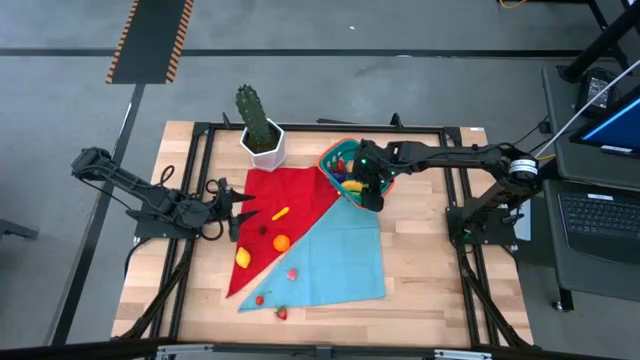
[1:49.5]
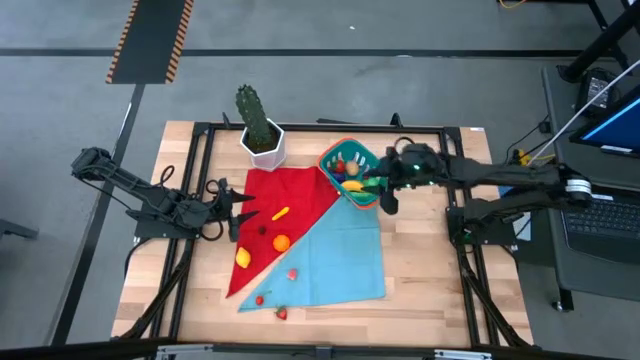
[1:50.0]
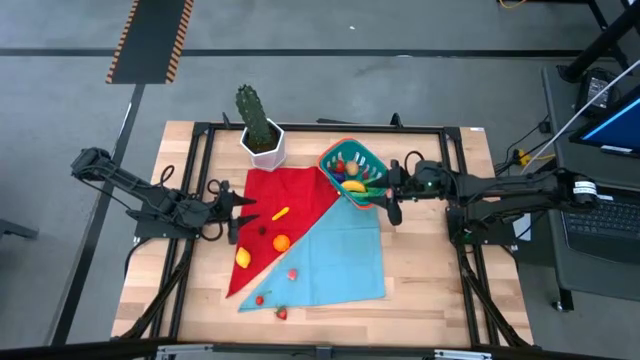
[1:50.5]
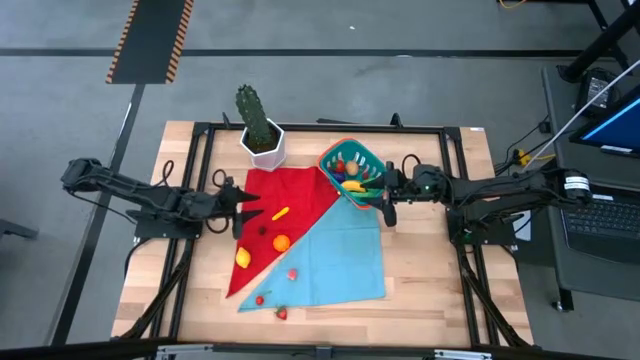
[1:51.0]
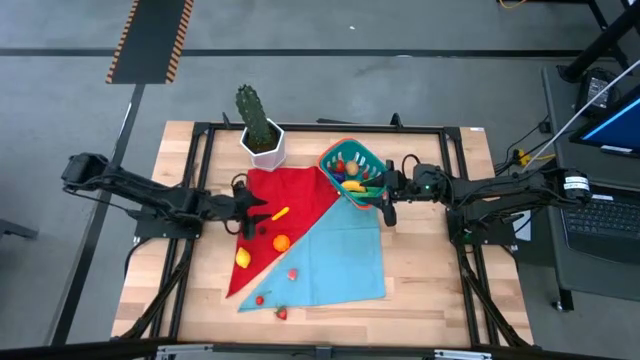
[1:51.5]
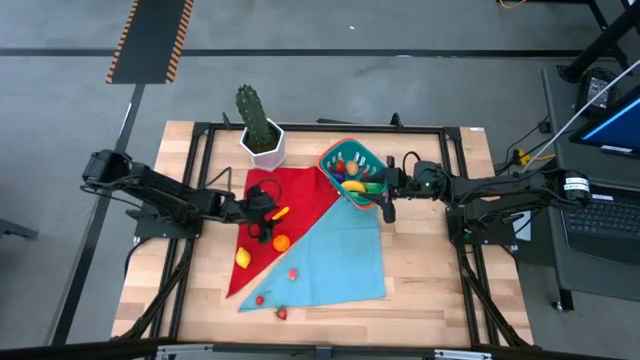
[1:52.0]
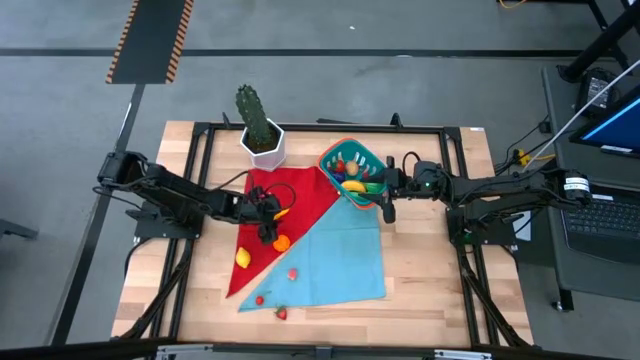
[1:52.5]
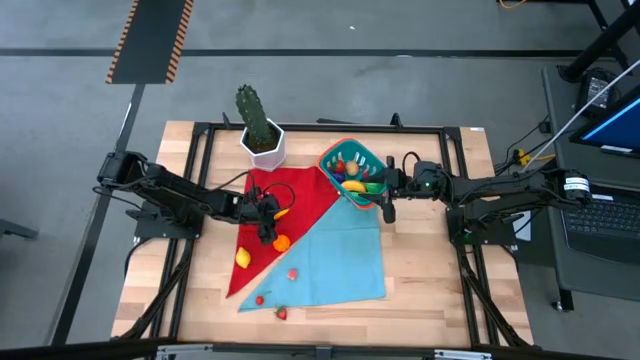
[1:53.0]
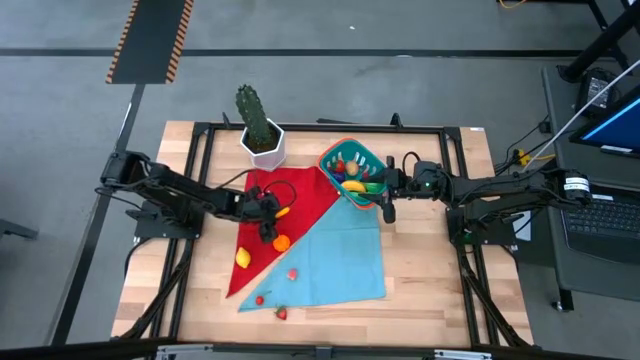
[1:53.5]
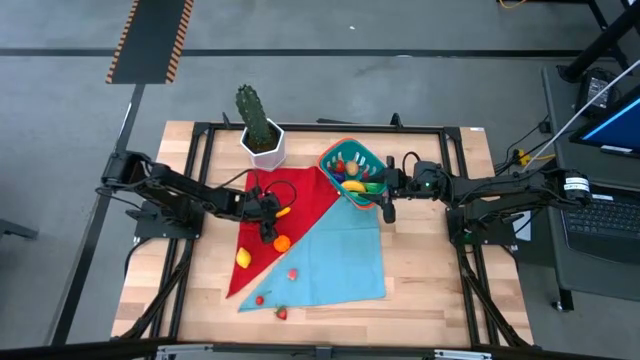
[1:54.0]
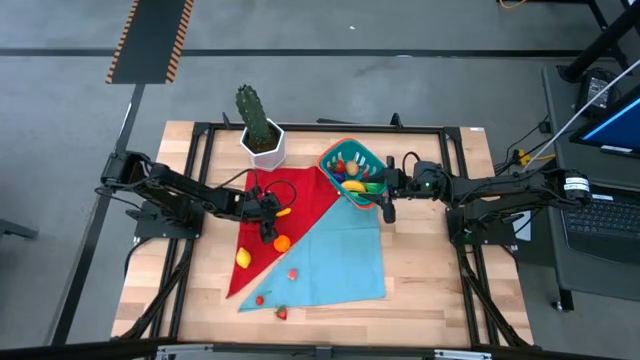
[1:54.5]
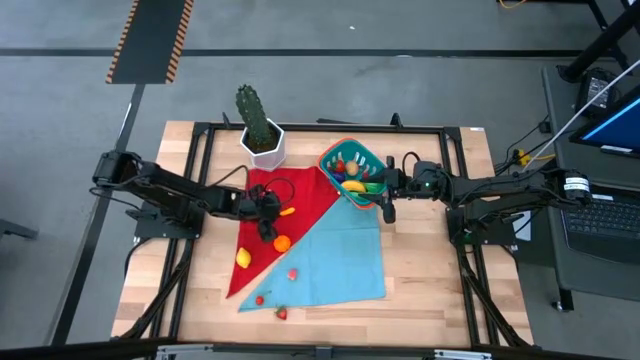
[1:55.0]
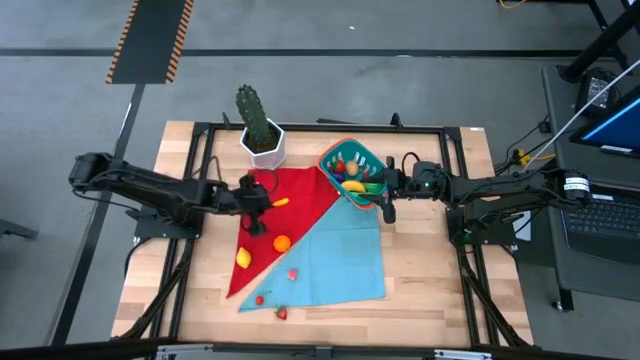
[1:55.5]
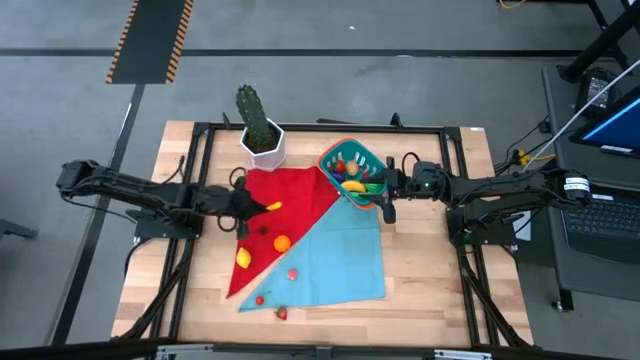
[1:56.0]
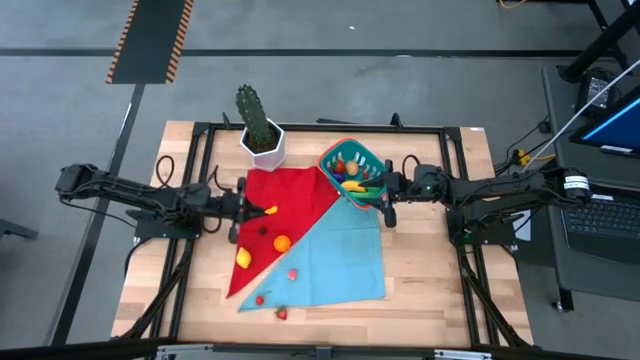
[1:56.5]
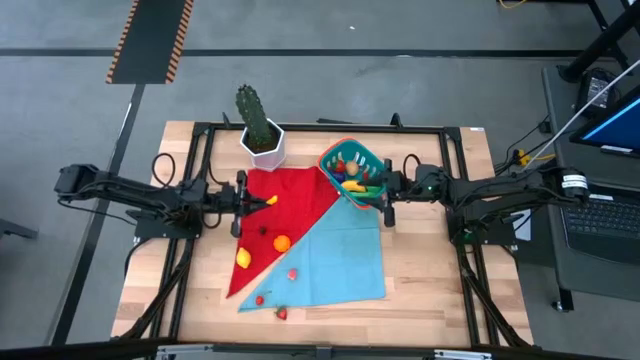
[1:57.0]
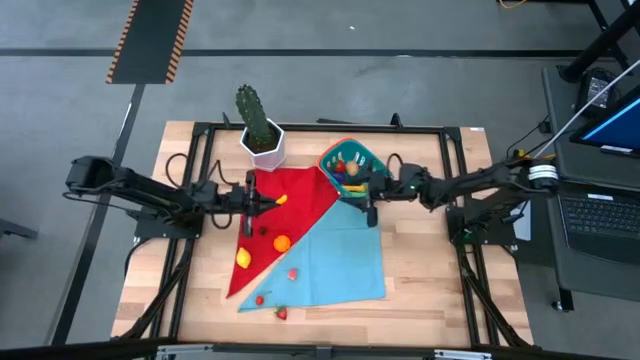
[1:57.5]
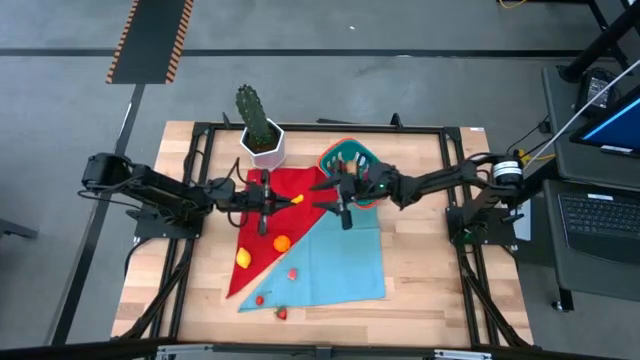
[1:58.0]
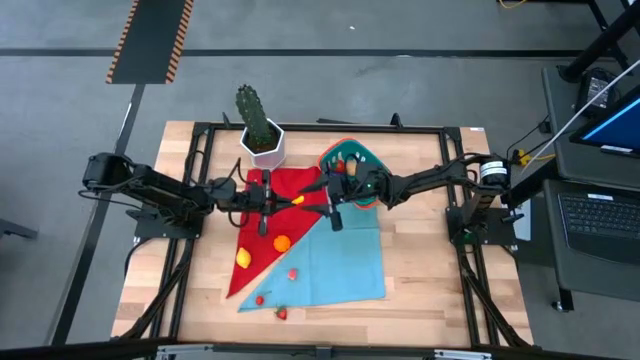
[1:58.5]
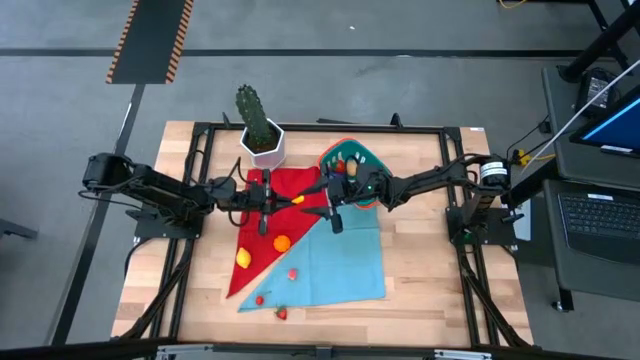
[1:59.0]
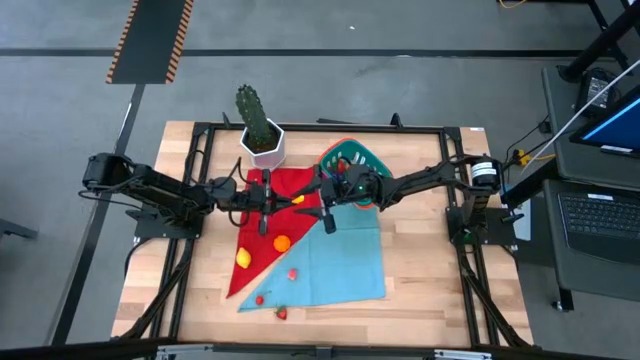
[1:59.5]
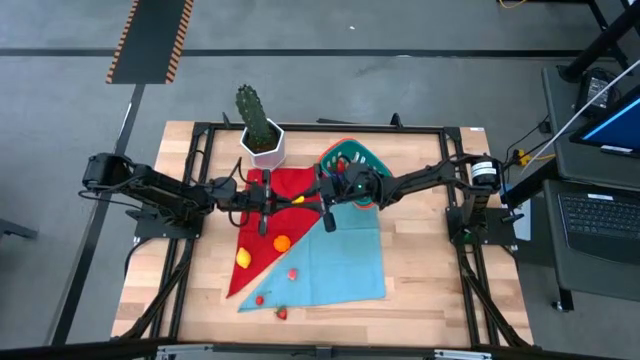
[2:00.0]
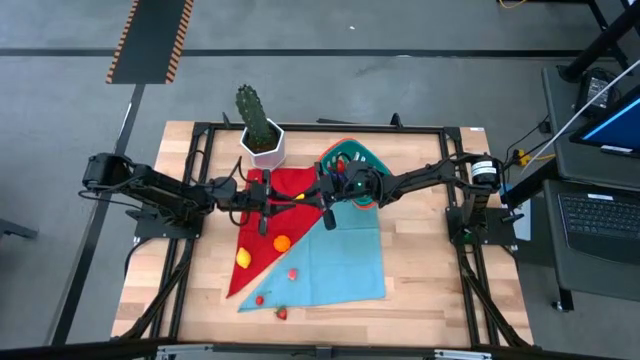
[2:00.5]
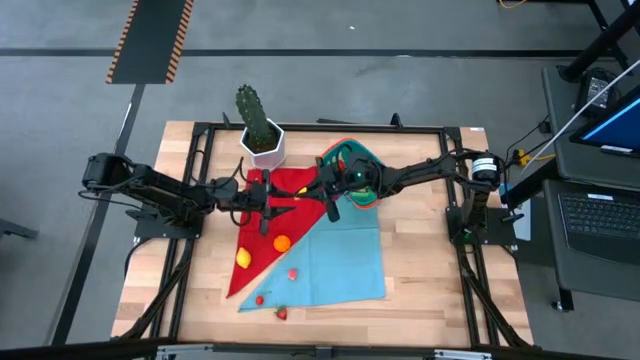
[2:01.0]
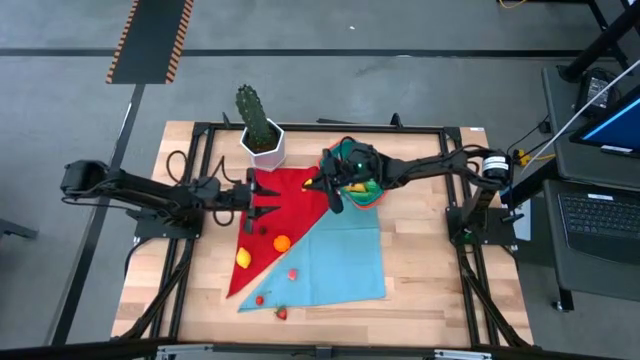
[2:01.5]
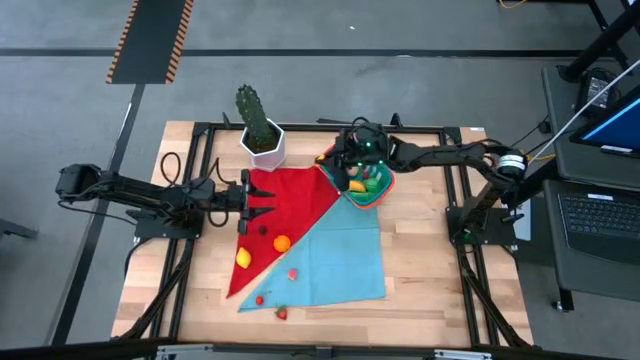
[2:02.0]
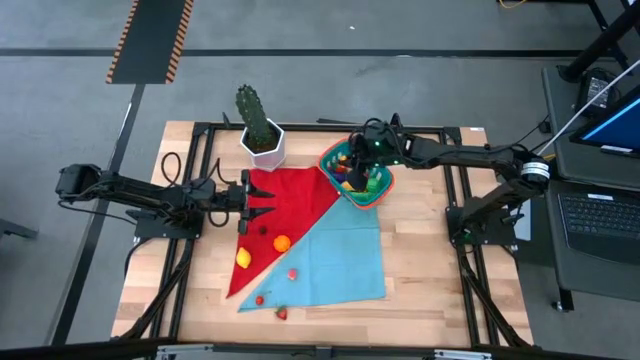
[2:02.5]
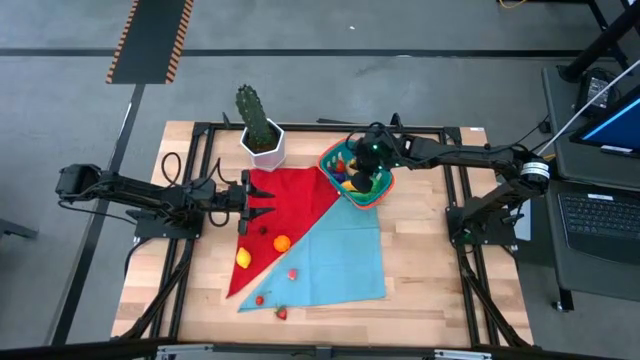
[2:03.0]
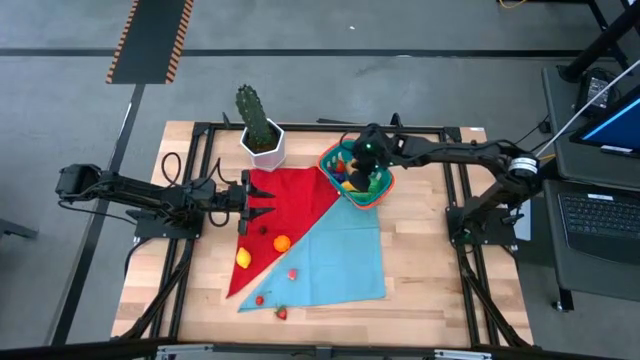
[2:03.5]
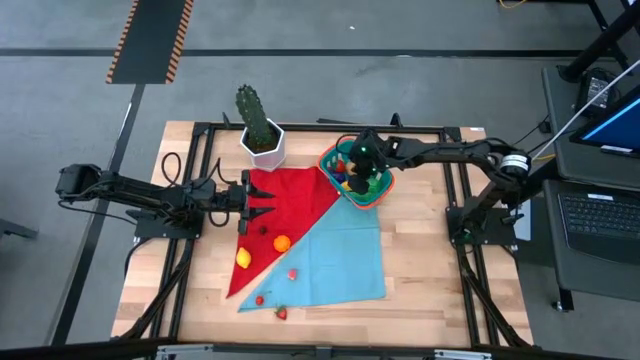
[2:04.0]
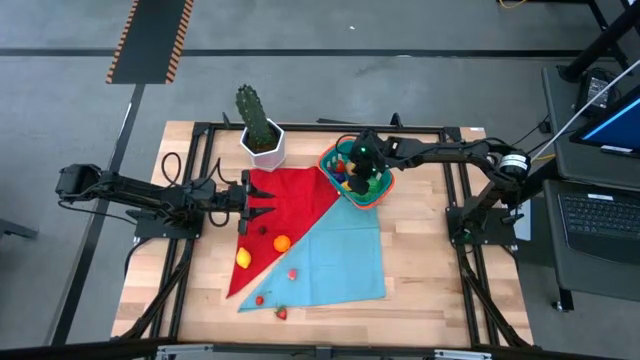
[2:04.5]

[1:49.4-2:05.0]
Task: Build produce basket
Put the yellow corn into the blue basket

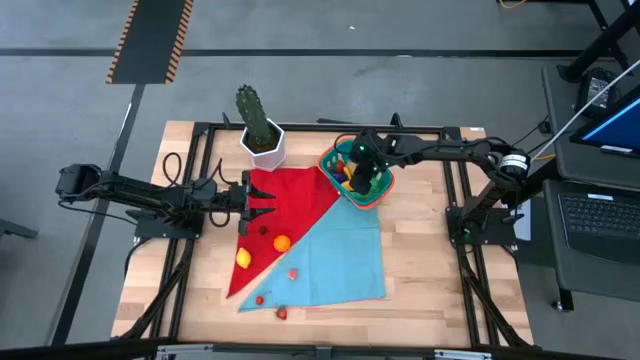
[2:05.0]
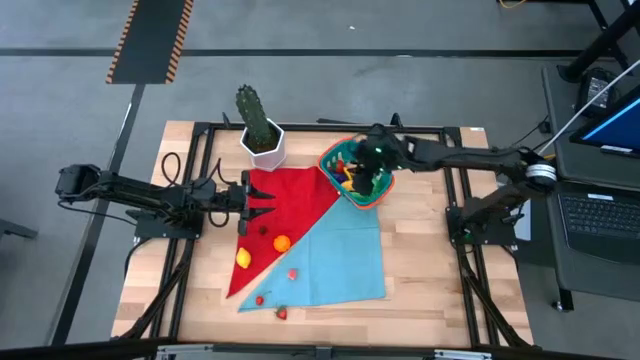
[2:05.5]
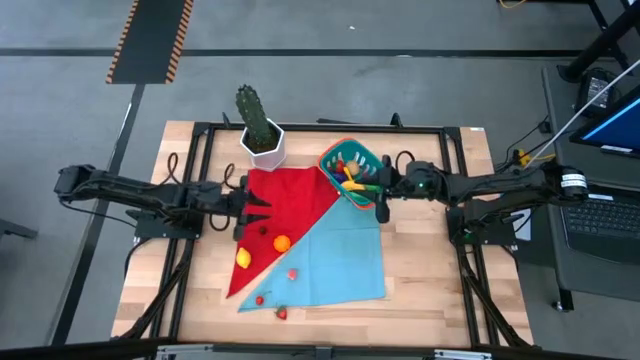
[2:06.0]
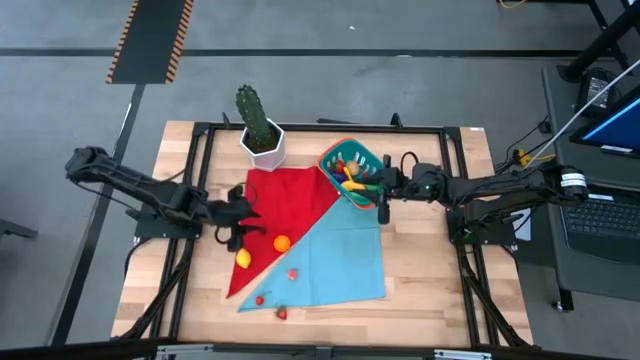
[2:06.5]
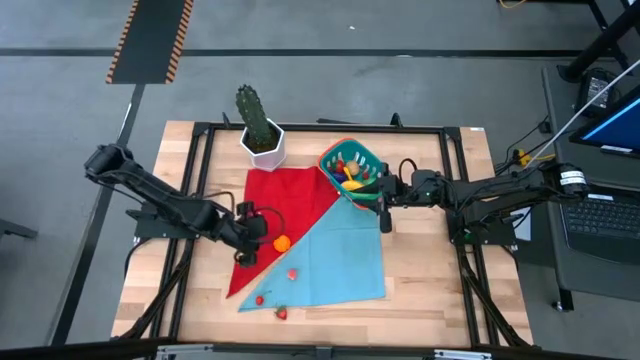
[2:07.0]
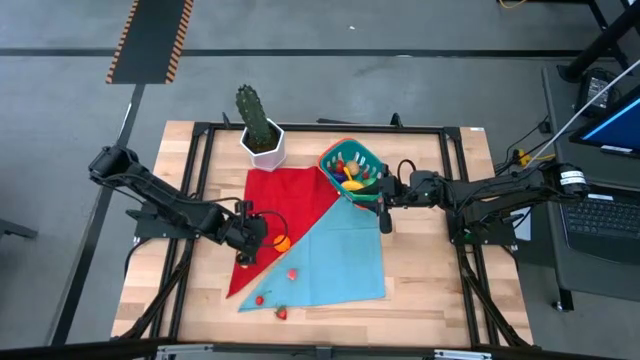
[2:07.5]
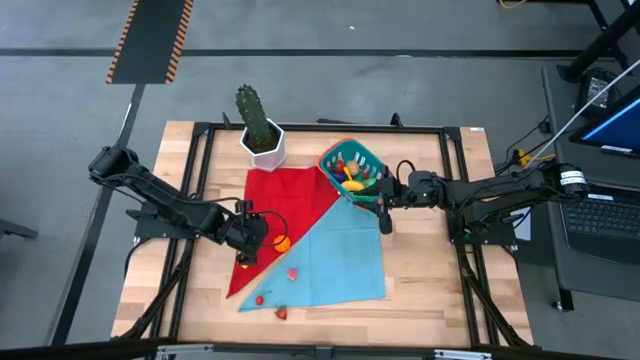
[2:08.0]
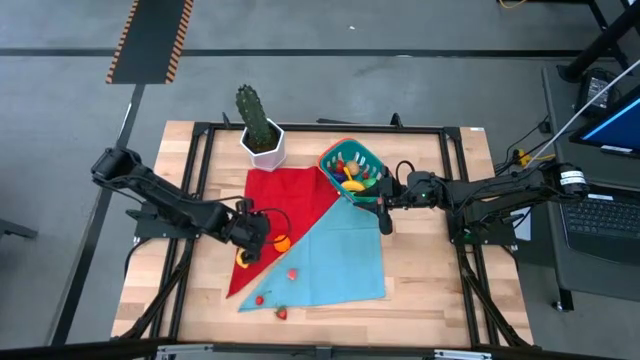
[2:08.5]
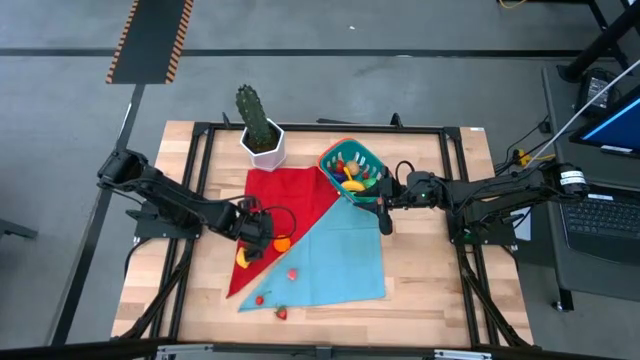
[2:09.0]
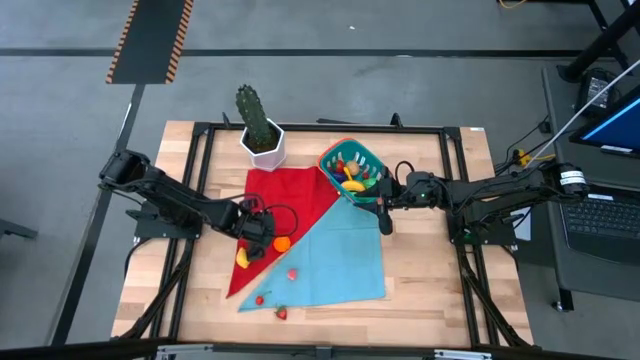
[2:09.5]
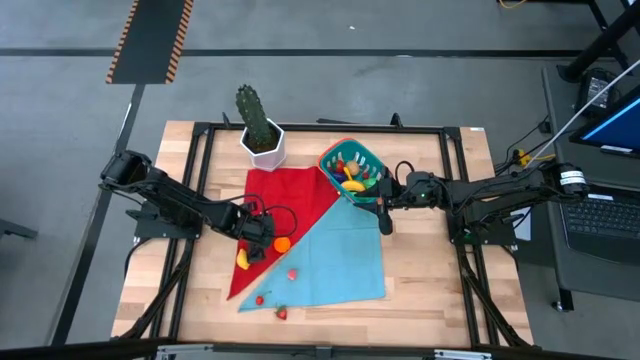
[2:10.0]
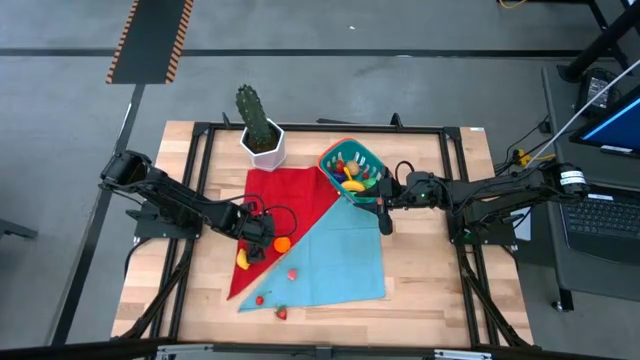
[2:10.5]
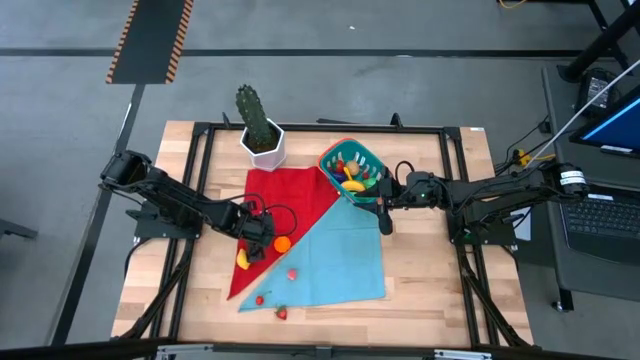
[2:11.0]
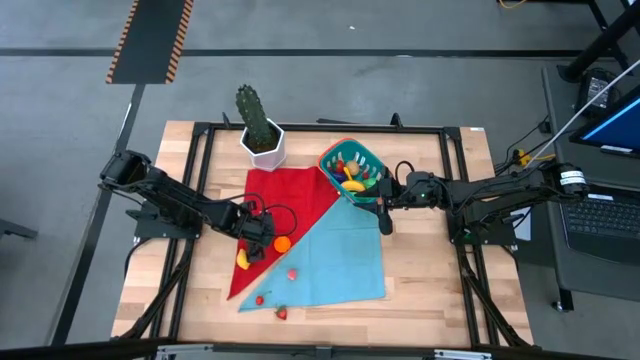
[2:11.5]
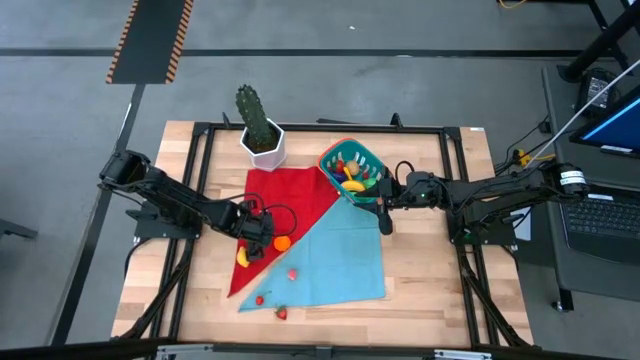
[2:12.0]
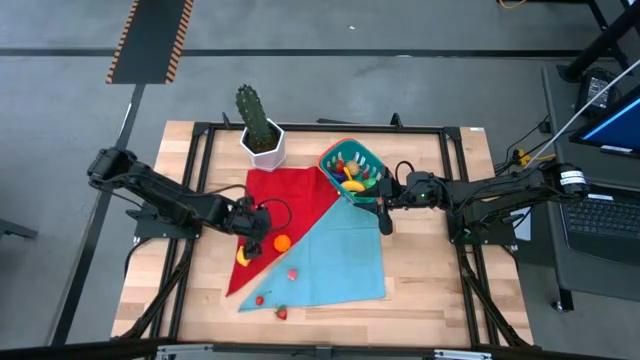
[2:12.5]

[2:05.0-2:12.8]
Put the black berry into the blue basket
